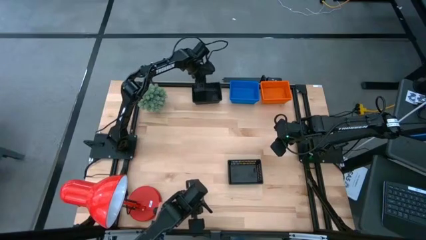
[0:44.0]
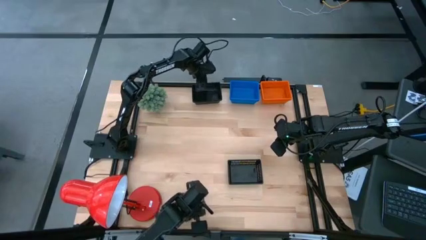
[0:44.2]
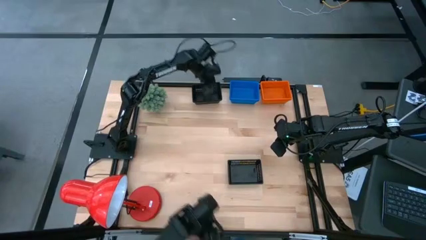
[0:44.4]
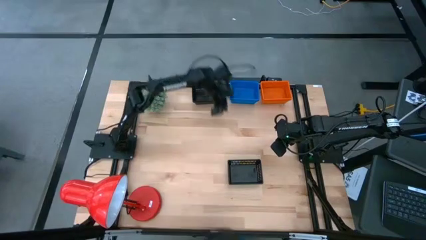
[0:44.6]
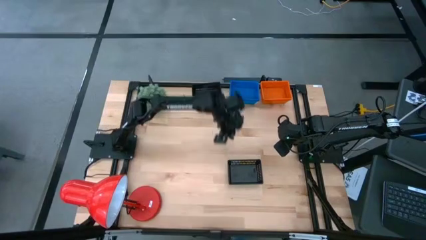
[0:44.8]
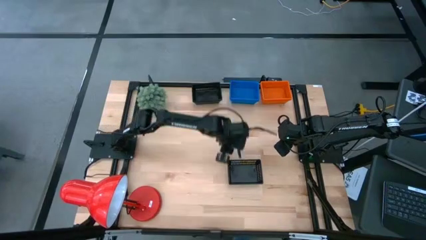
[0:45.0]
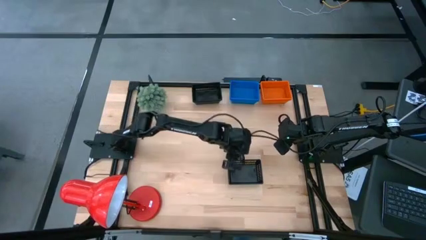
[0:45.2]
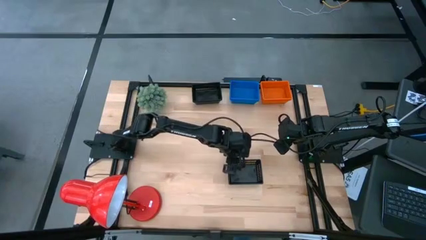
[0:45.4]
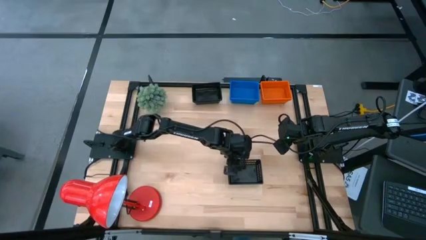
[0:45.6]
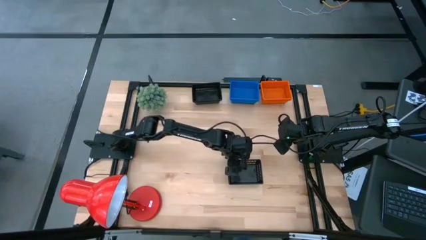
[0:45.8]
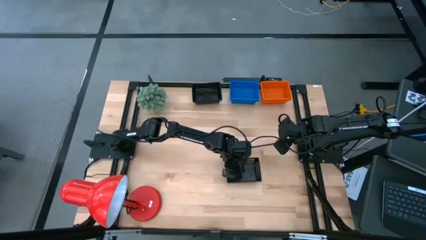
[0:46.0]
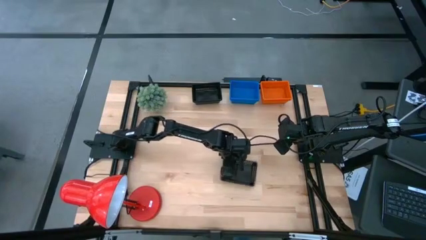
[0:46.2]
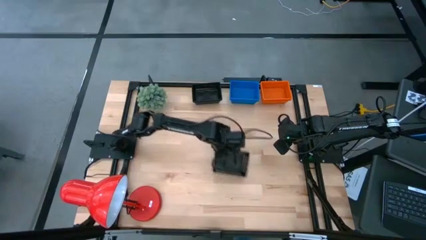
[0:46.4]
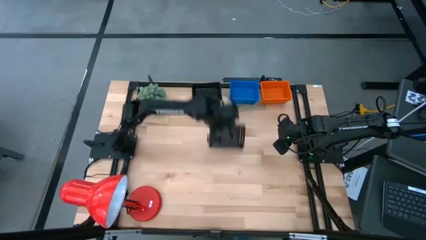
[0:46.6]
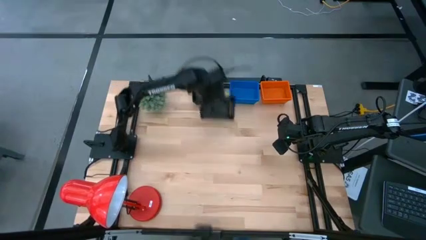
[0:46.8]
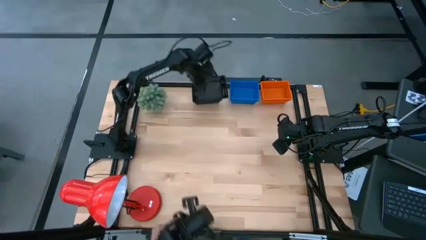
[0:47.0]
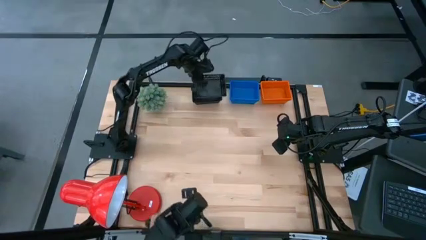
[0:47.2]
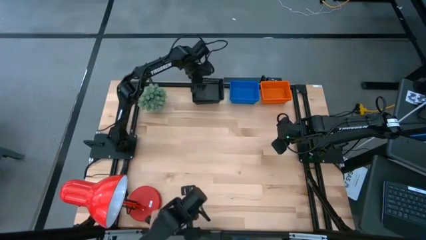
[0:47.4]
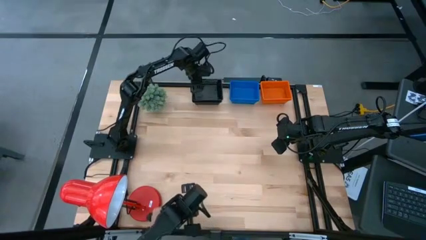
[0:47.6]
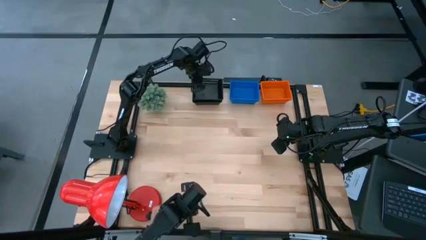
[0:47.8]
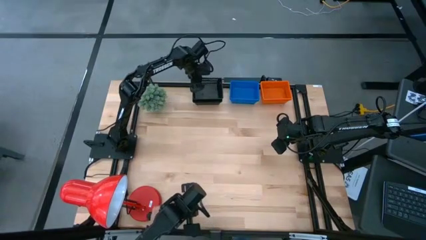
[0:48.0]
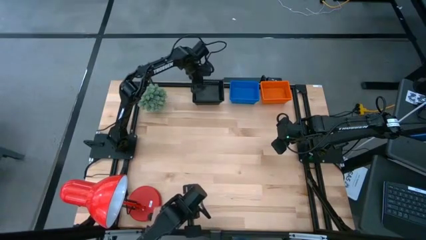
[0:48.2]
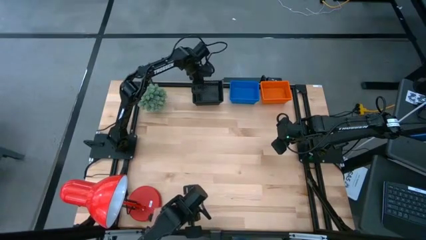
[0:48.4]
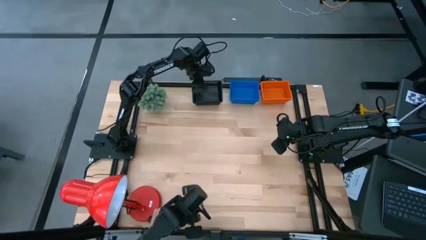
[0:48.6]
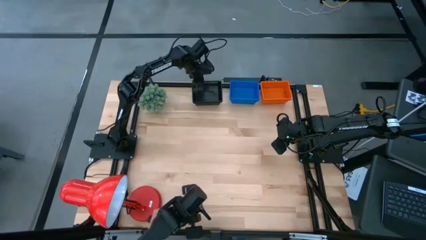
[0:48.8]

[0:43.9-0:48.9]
Stack the bottom black bin on the top black bin

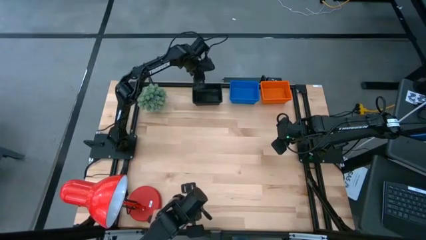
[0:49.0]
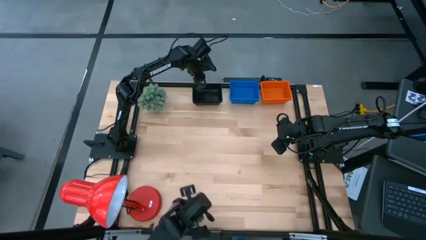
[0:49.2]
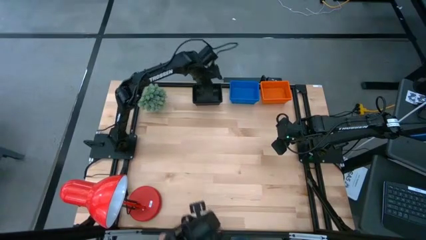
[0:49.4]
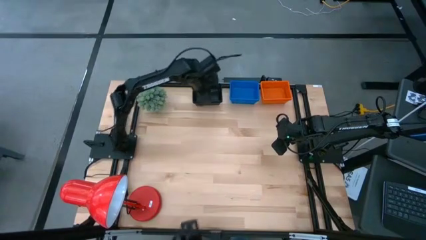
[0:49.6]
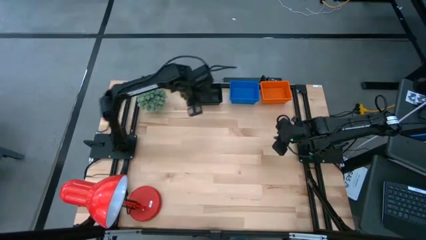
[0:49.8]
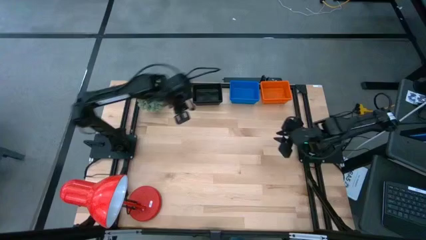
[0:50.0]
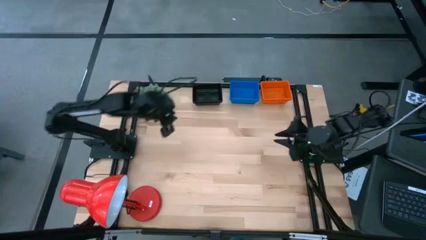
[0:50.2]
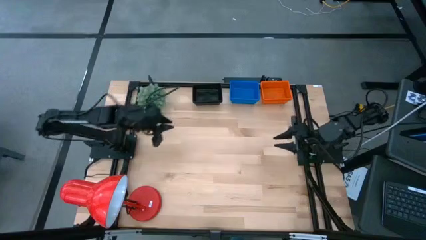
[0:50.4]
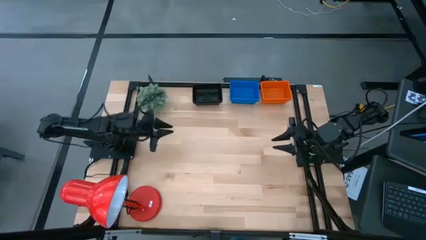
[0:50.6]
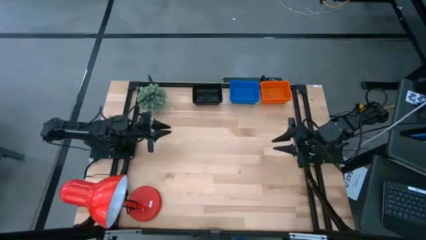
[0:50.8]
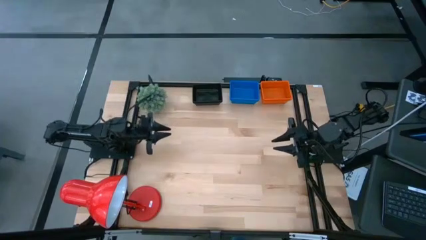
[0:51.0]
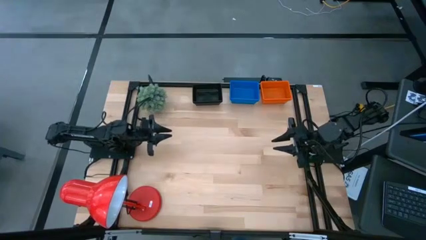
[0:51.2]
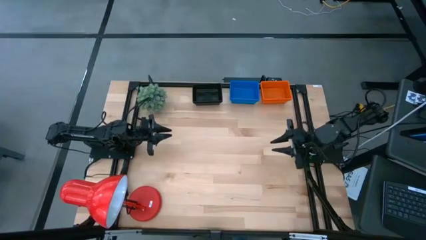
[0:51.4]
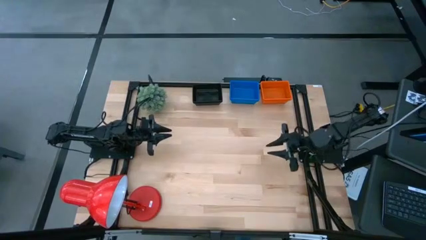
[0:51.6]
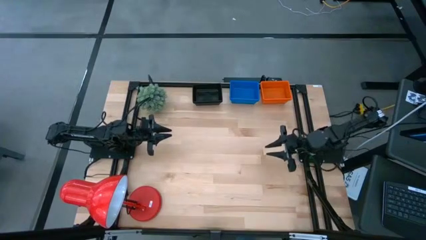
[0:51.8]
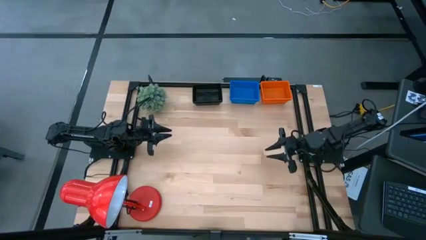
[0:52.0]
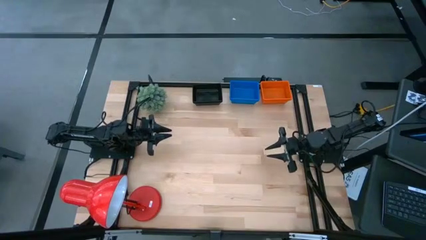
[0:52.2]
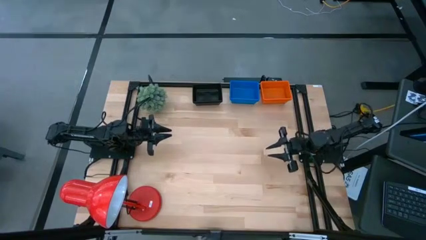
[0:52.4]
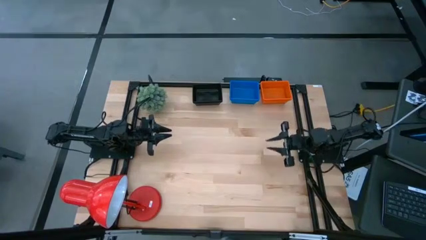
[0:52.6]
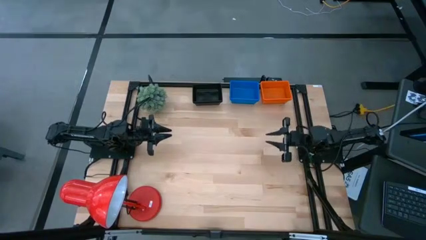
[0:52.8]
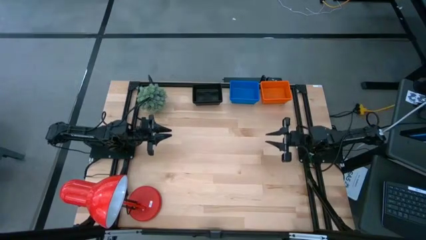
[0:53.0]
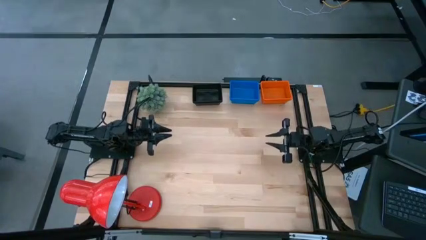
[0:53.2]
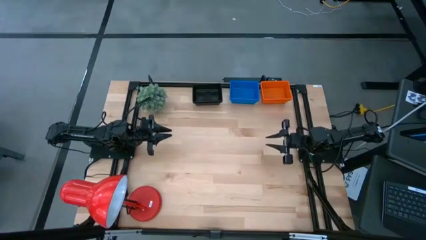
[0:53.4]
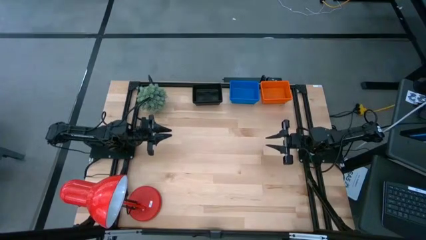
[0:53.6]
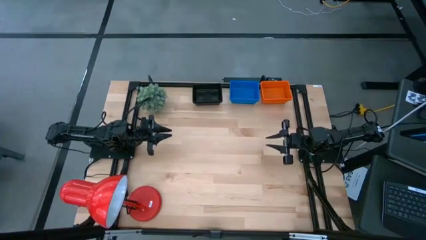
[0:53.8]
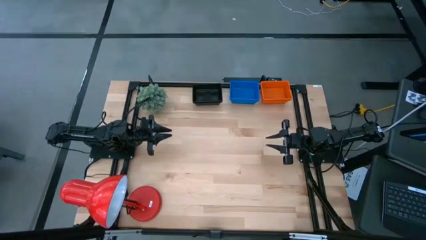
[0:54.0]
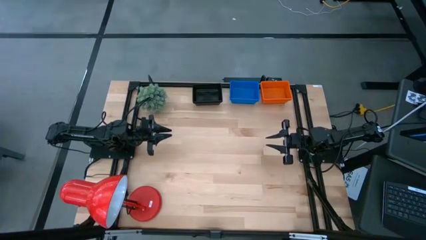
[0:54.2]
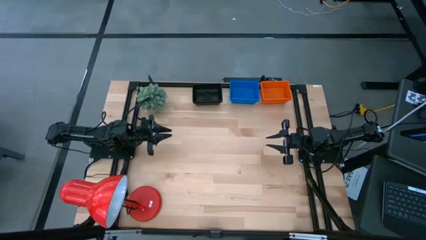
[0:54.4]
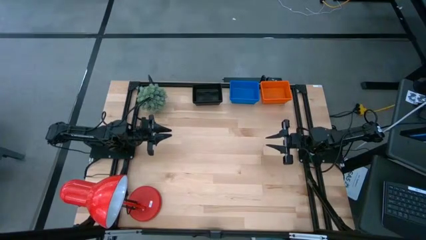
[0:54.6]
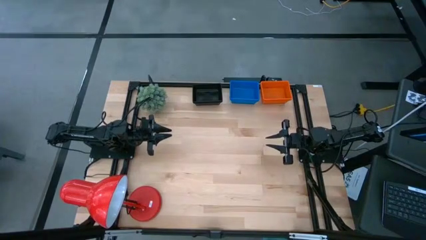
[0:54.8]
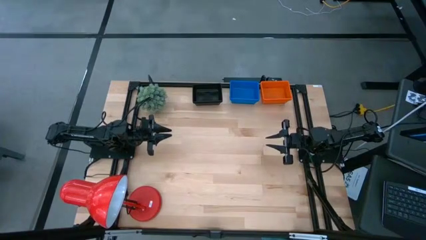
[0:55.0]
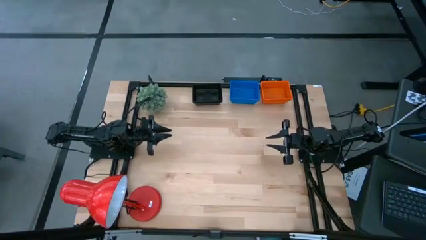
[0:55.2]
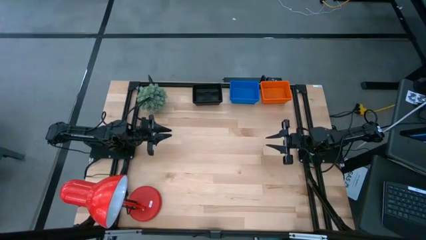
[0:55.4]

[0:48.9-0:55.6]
Return to Home Position
